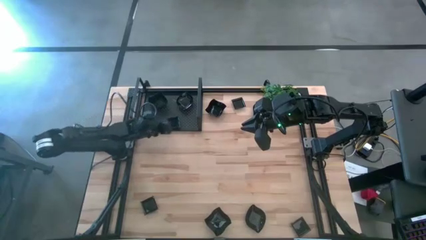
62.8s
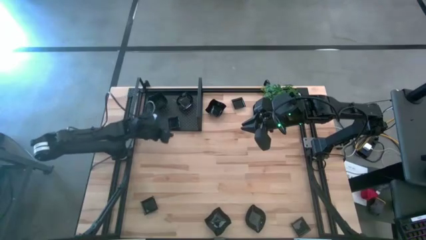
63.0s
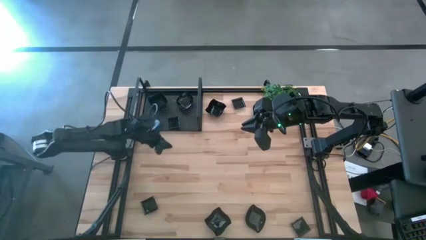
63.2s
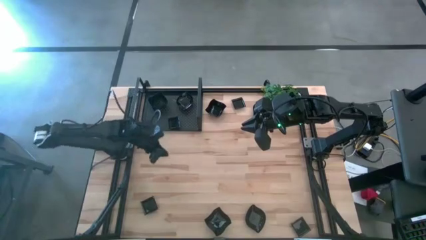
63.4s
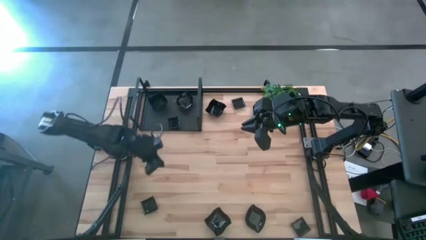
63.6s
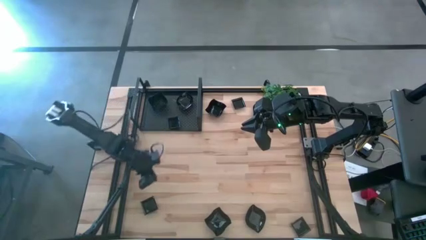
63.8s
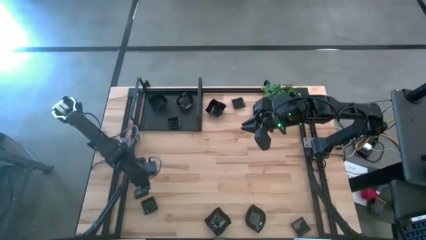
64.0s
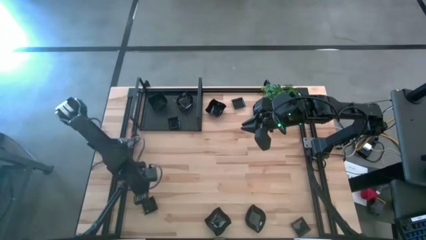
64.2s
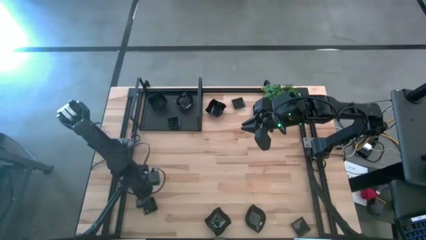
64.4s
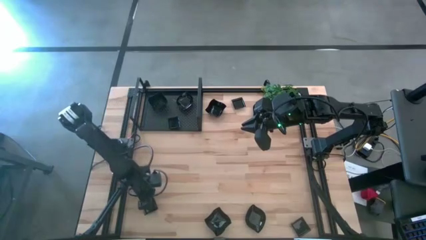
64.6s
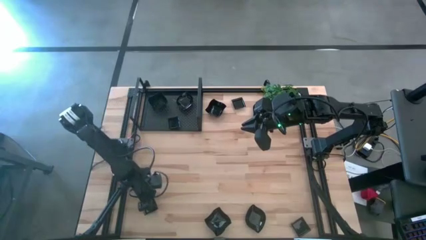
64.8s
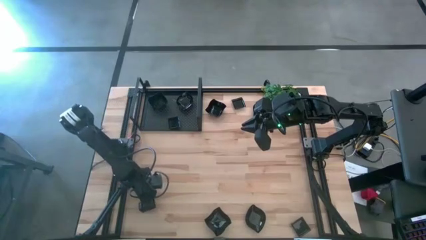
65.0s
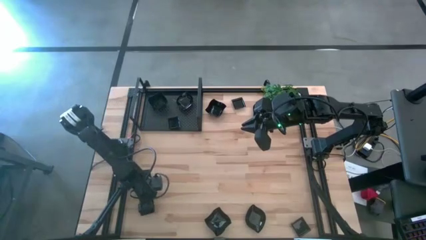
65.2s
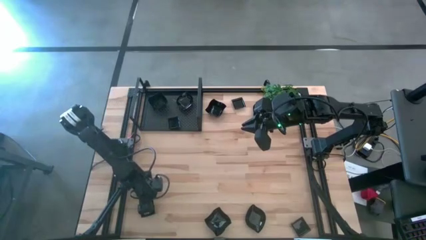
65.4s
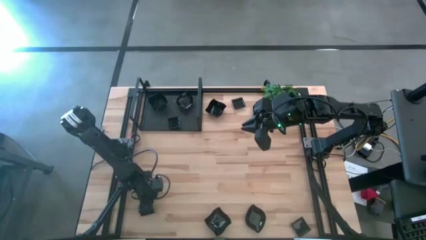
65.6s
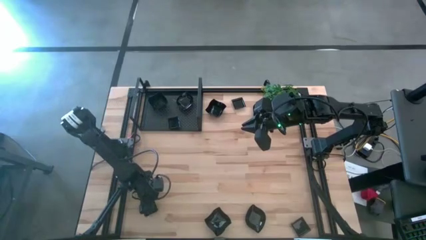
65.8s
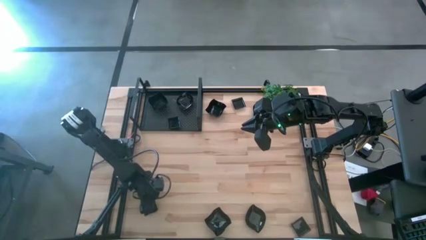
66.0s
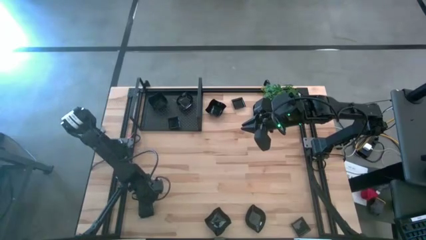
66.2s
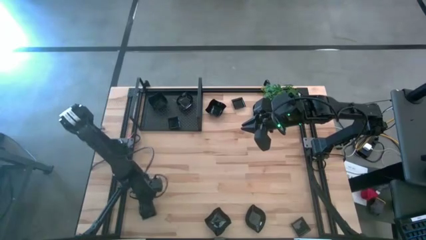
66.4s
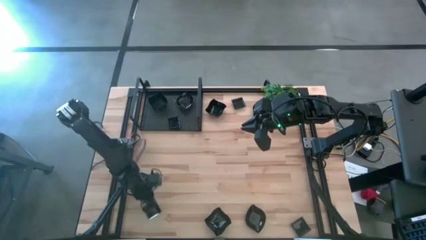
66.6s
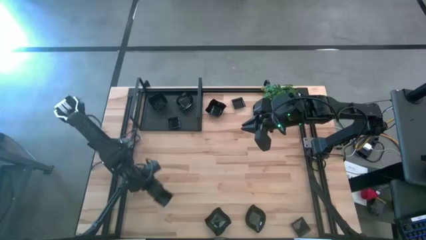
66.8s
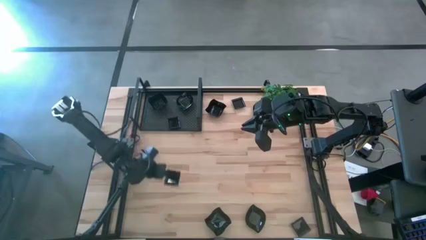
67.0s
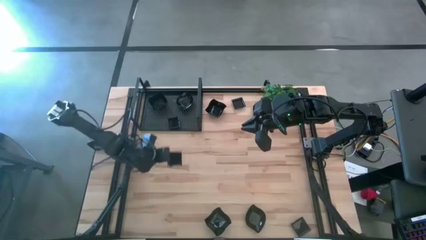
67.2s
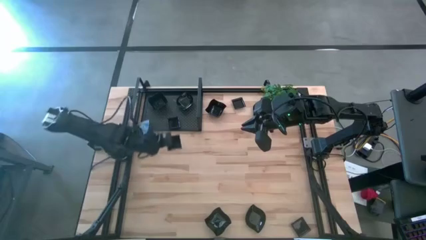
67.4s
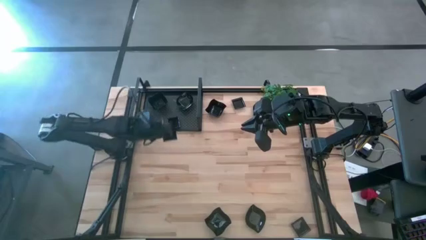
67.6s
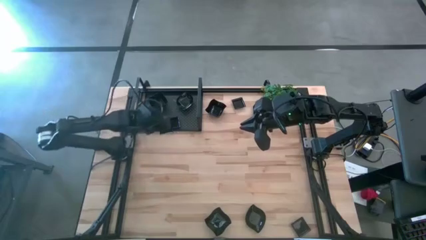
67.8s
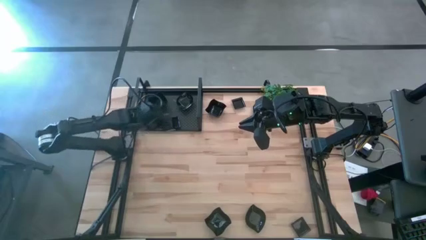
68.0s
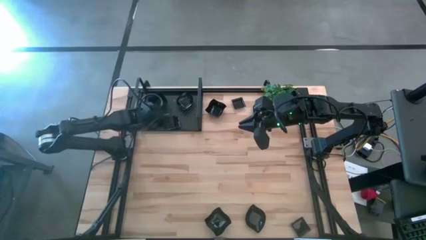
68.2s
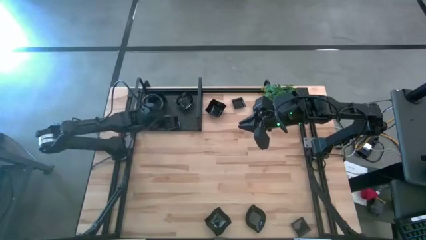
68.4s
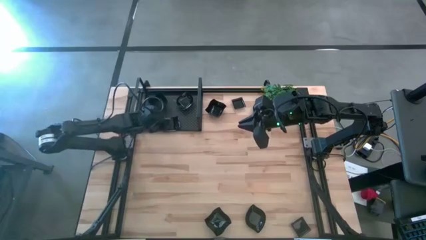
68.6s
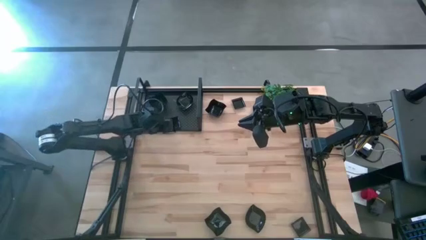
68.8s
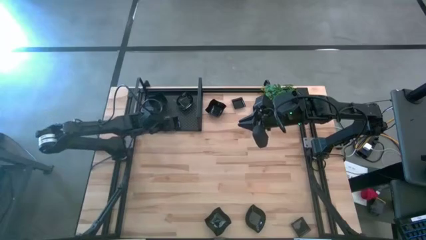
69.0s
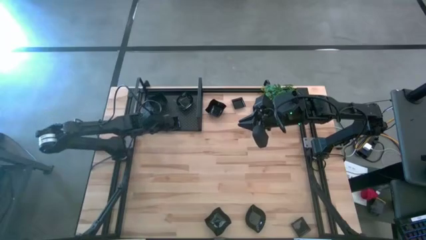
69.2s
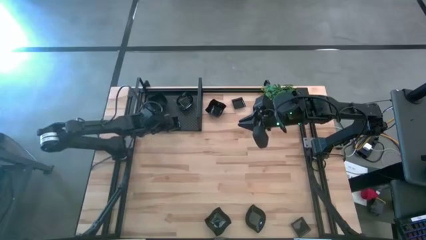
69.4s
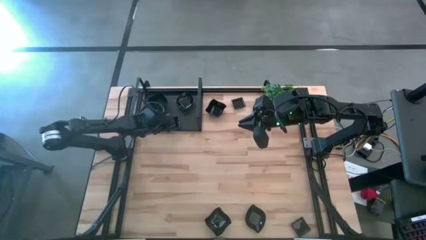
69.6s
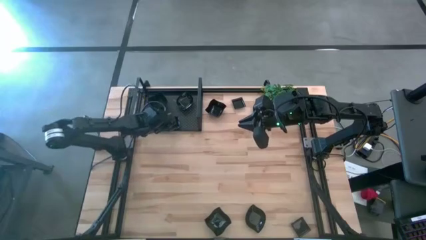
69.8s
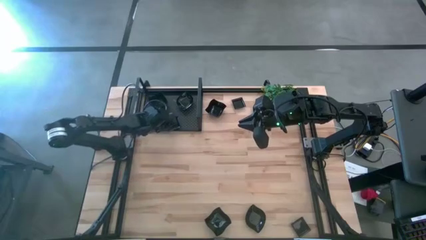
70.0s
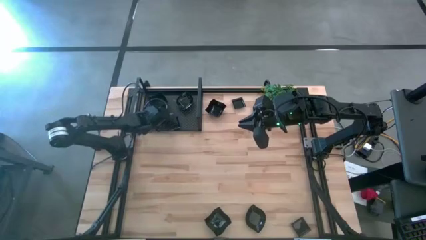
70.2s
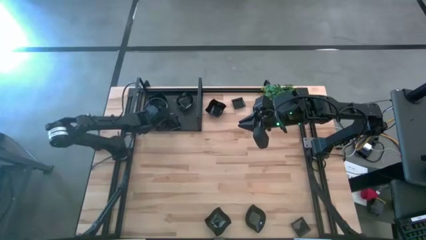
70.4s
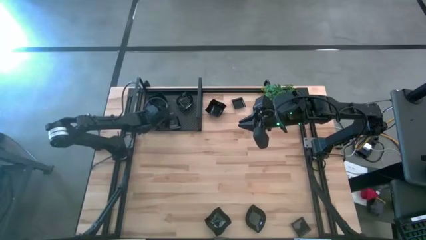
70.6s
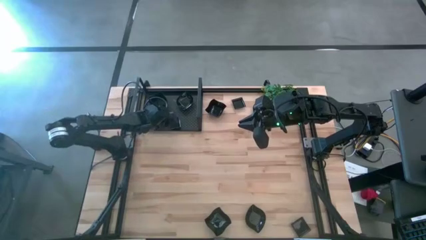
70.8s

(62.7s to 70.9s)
Task: Pick & Place Mini shaped plates
Stack the black square plate on top of the black square plate on the shelf

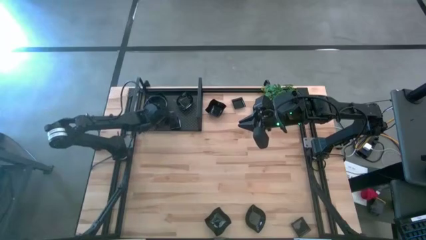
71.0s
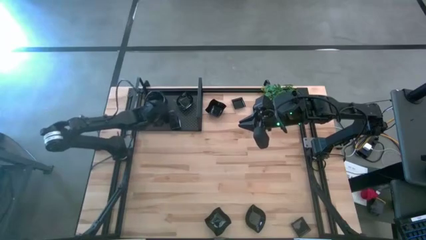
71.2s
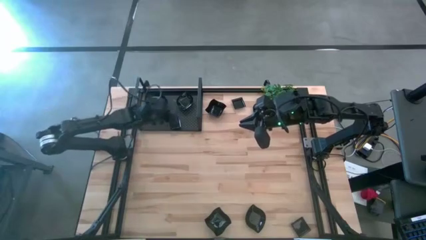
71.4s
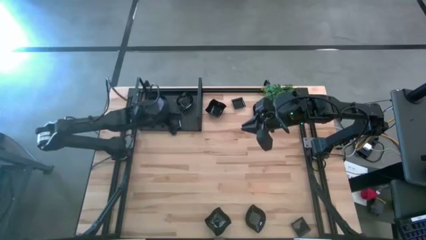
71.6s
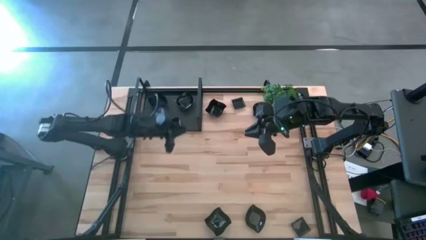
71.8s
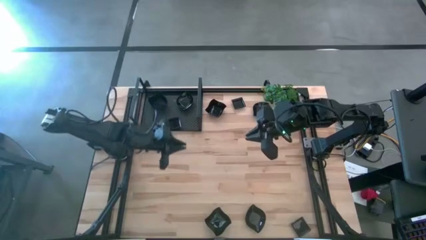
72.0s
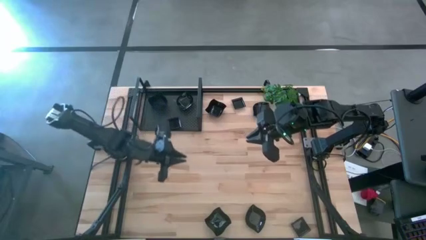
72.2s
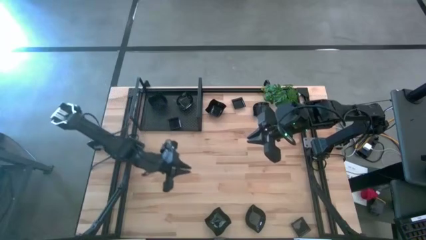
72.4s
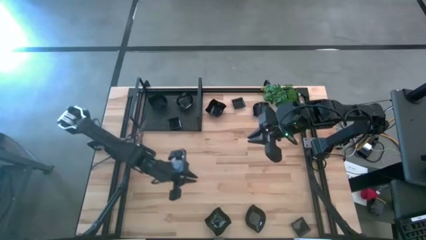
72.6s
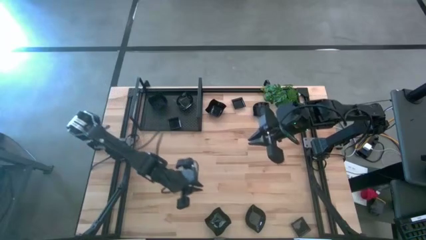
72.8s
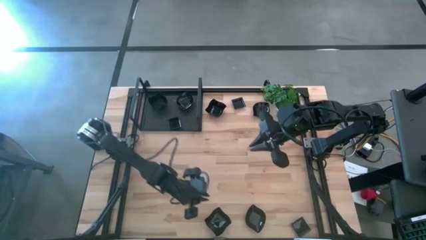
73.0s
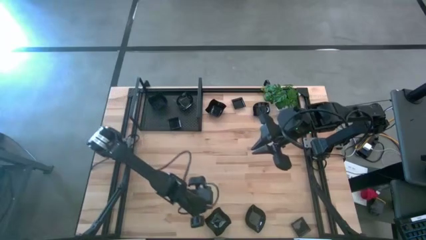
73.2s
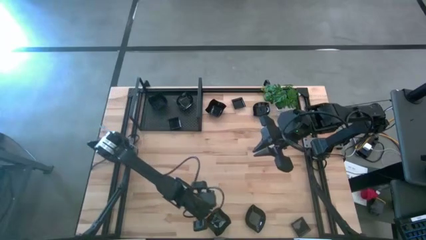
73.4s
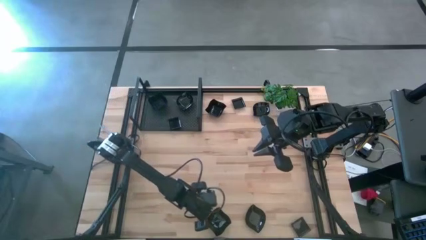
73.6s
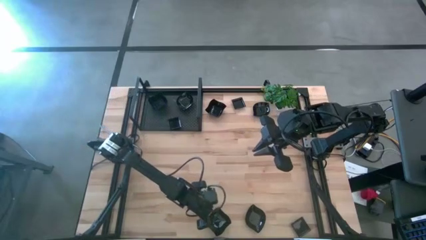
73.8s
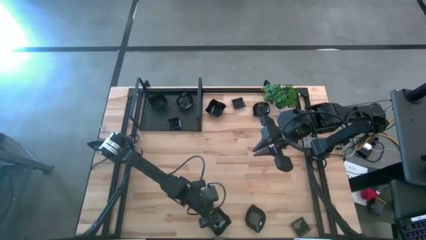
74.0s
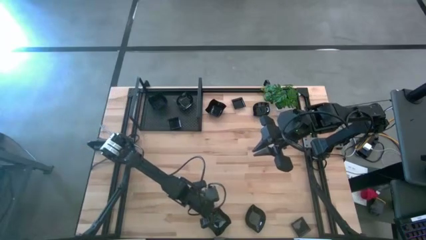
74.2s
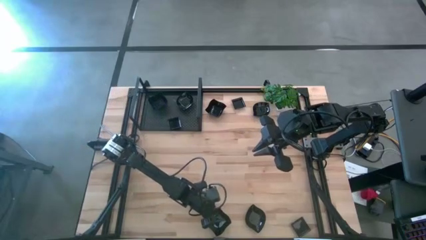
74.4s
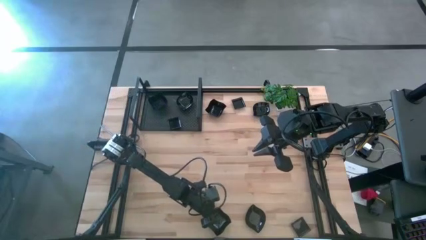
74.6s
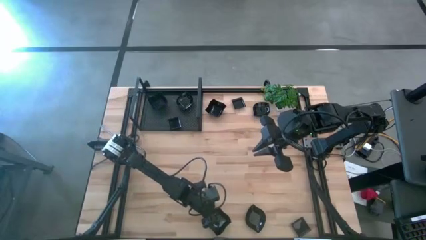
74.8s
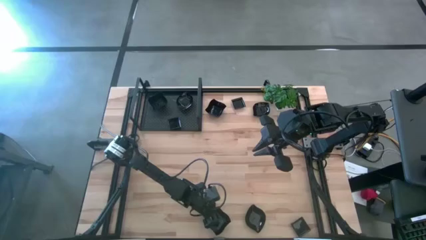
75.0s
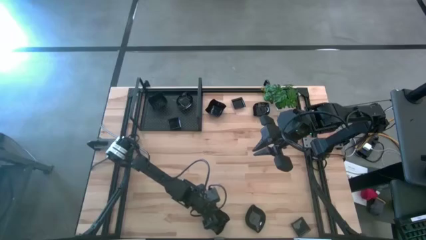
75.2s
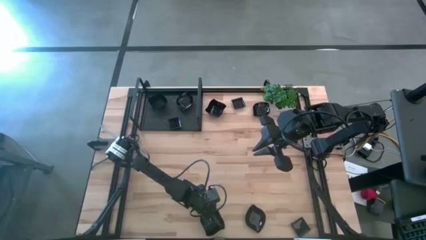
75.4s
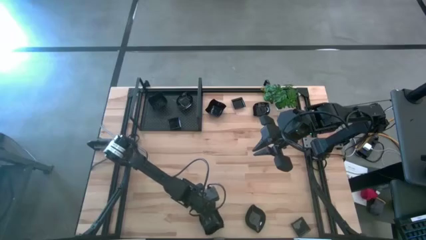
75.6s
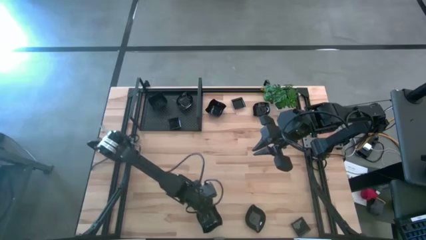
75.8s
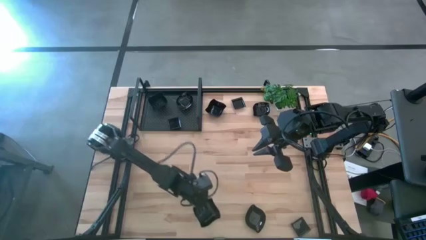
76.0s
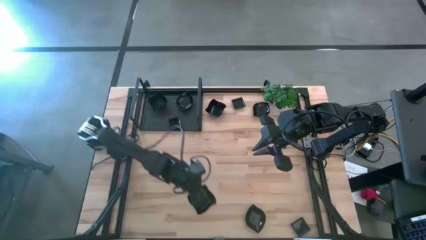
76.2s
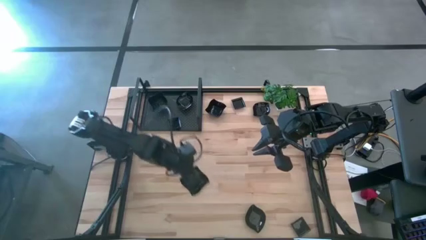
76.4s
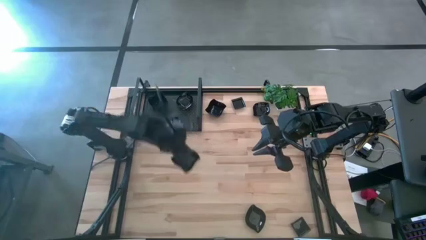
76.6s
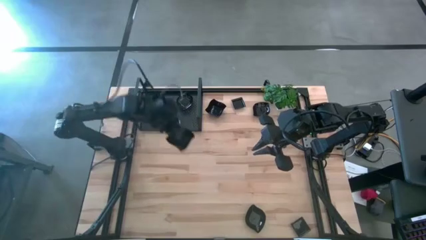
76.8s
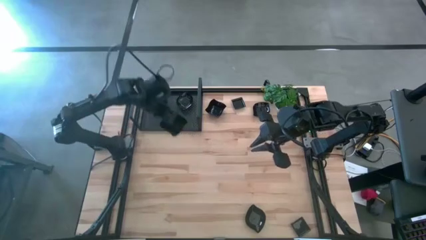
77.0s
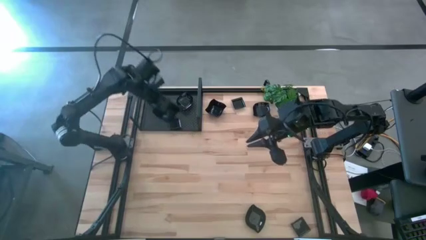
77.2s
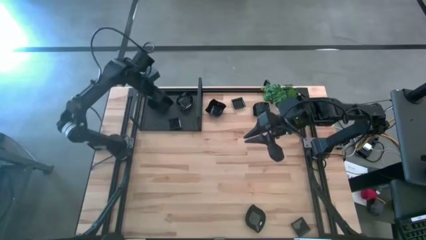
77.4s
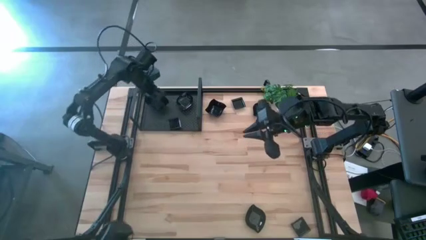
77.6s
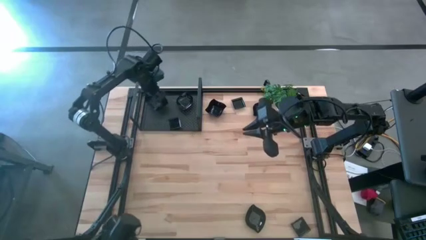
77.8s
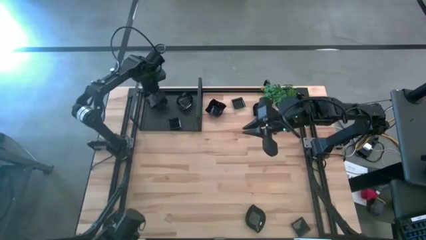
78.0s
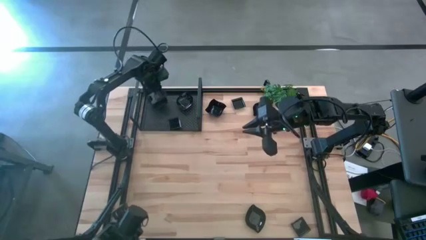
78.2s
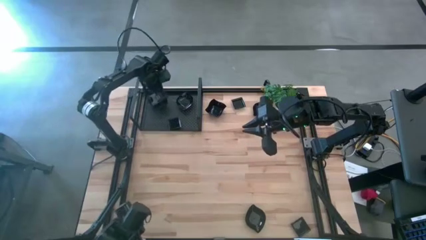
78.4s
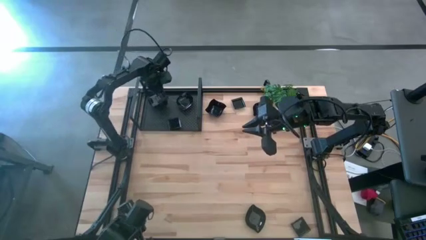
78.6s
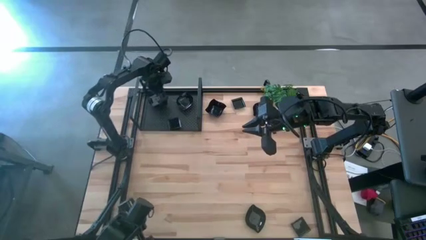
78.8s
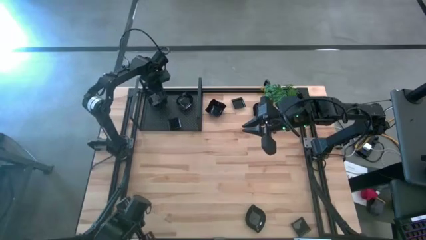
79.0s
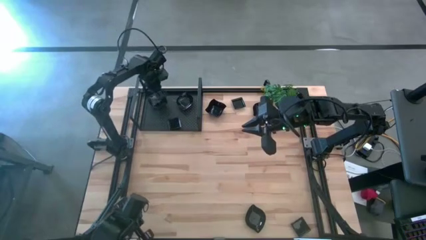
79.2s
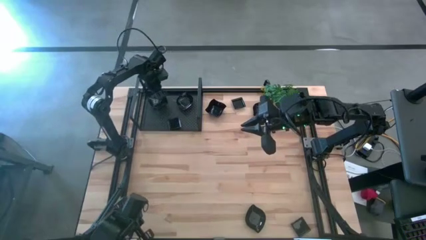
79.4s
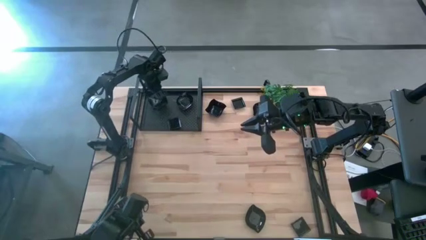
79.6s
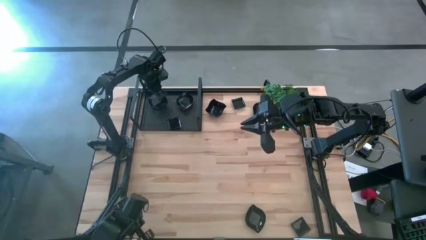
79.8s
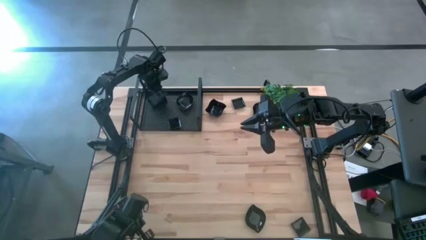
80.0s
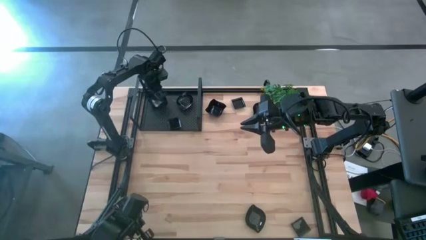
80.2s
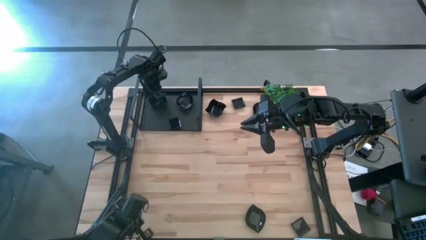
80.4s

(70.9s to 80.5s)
Stack the black distorted square plate on top of the black distorted square plates on the shelf
